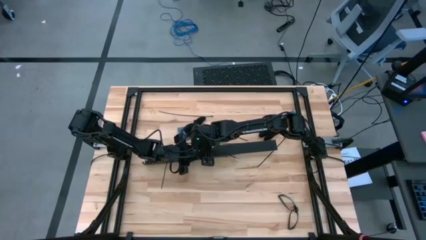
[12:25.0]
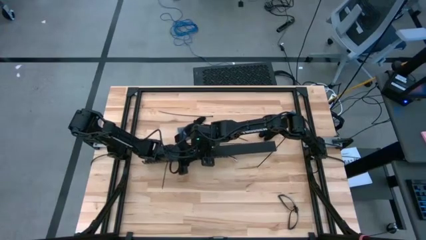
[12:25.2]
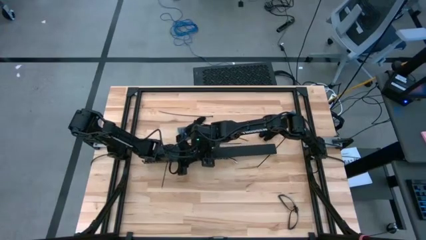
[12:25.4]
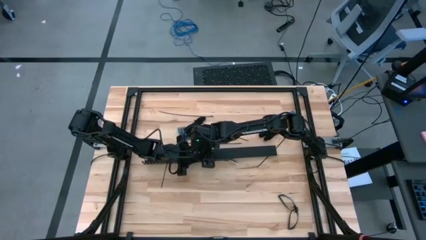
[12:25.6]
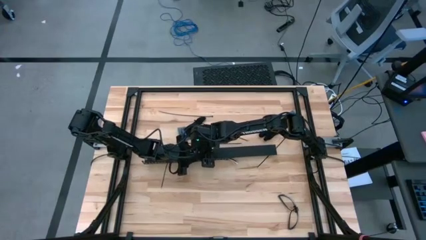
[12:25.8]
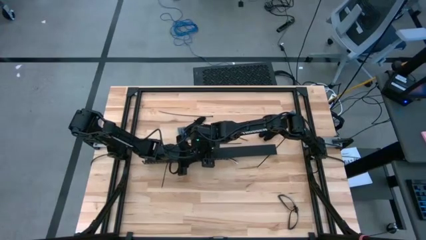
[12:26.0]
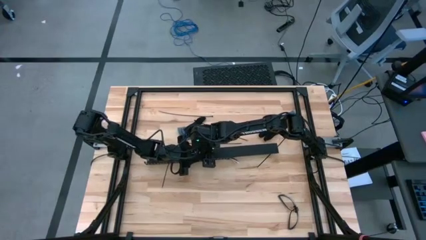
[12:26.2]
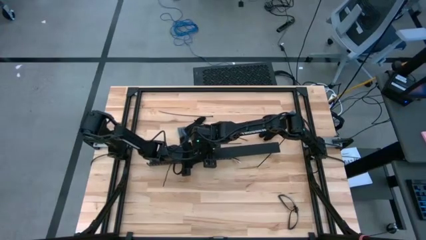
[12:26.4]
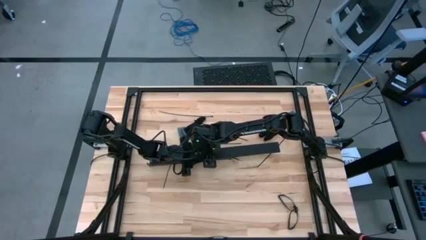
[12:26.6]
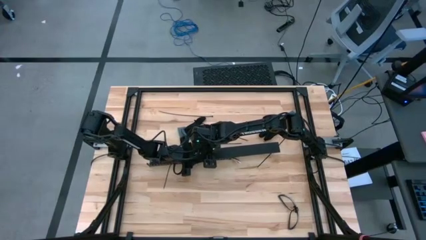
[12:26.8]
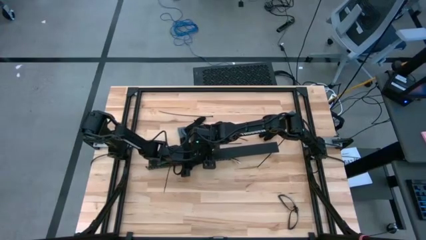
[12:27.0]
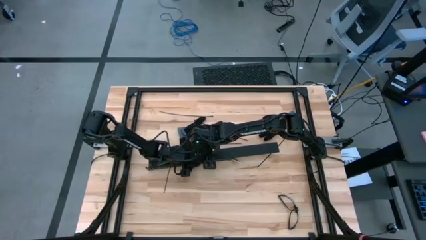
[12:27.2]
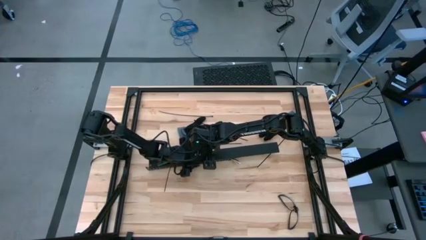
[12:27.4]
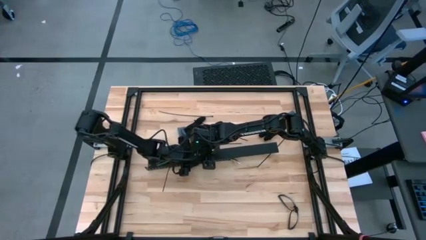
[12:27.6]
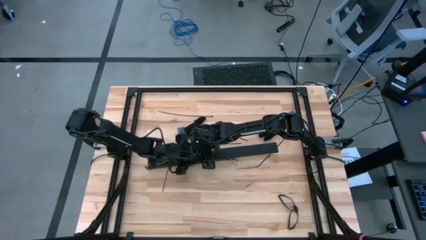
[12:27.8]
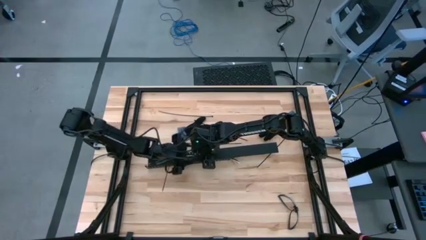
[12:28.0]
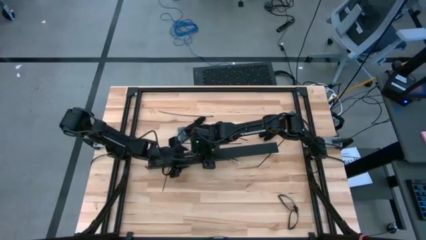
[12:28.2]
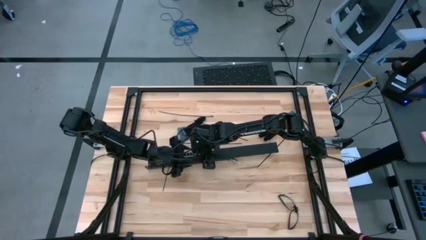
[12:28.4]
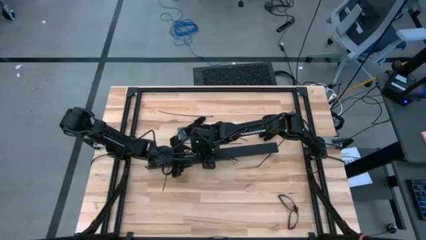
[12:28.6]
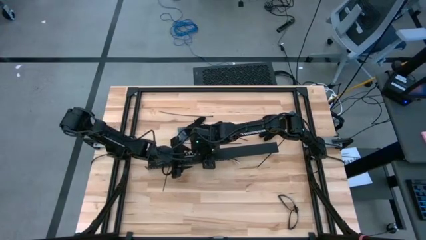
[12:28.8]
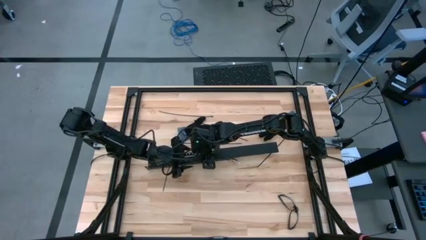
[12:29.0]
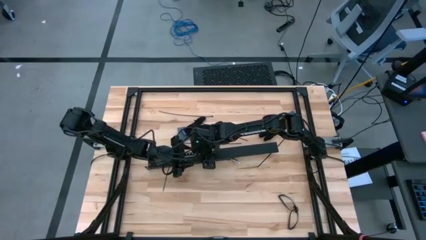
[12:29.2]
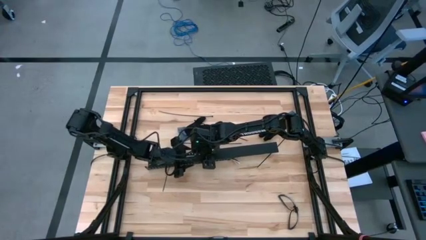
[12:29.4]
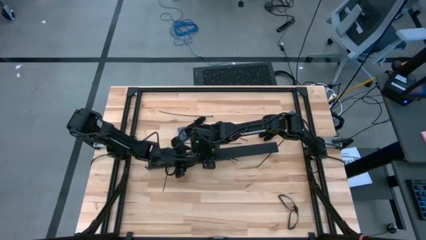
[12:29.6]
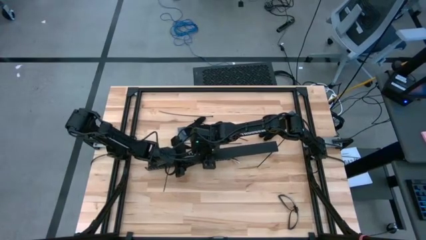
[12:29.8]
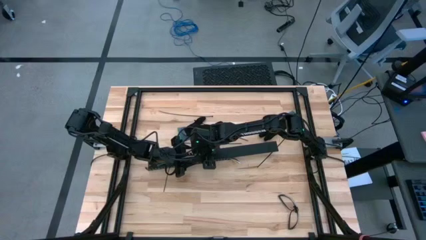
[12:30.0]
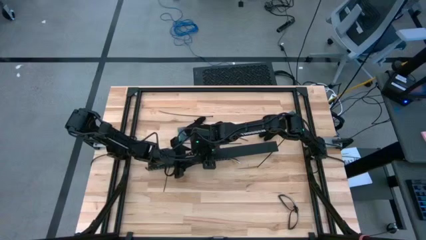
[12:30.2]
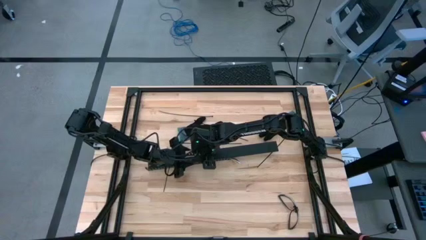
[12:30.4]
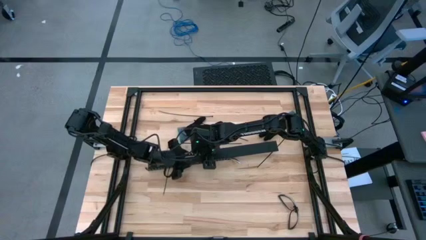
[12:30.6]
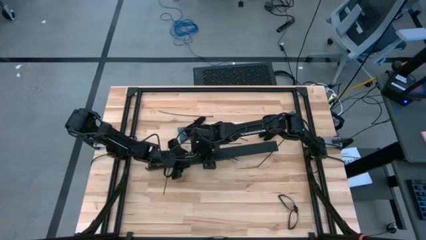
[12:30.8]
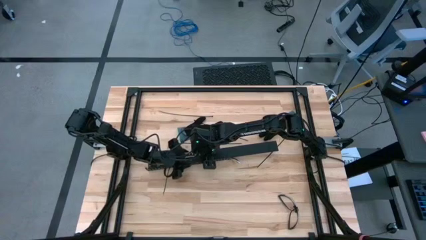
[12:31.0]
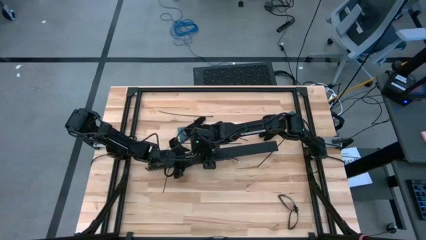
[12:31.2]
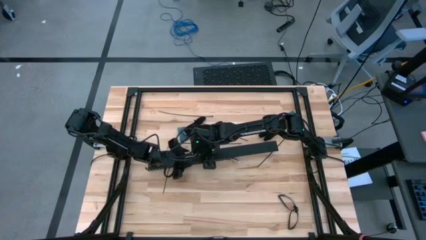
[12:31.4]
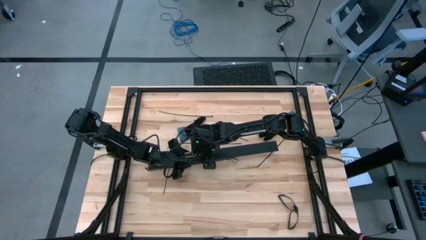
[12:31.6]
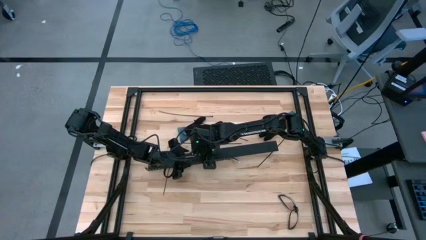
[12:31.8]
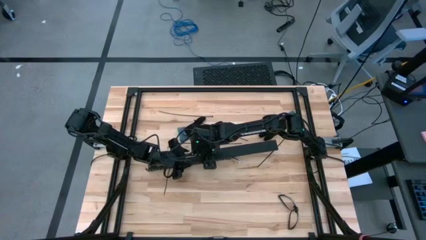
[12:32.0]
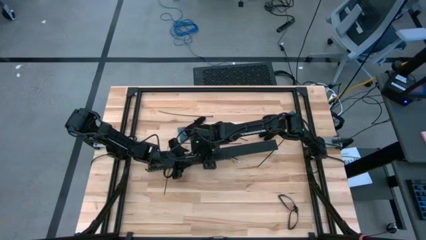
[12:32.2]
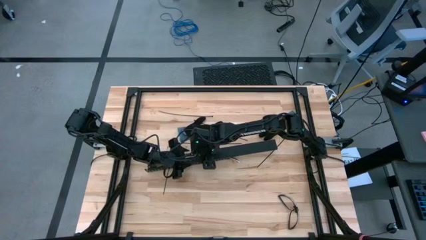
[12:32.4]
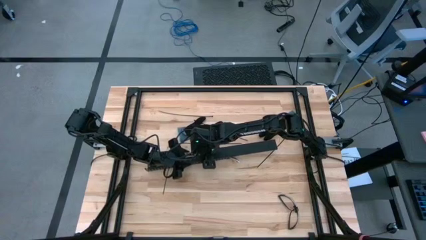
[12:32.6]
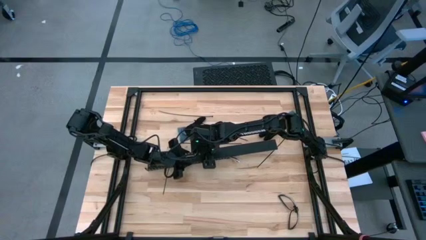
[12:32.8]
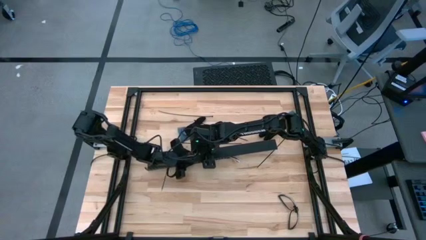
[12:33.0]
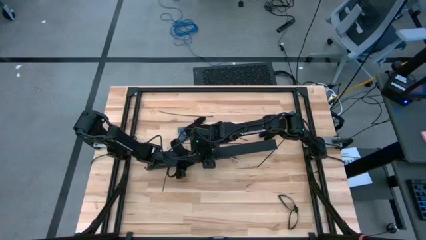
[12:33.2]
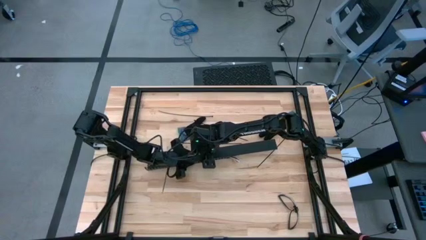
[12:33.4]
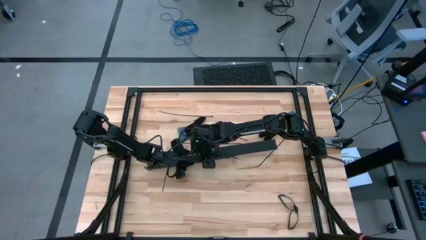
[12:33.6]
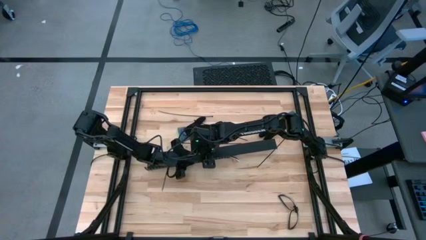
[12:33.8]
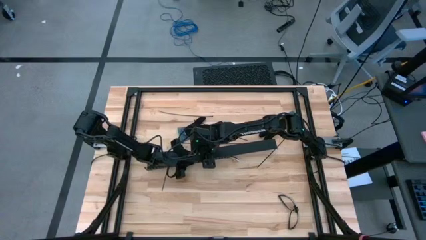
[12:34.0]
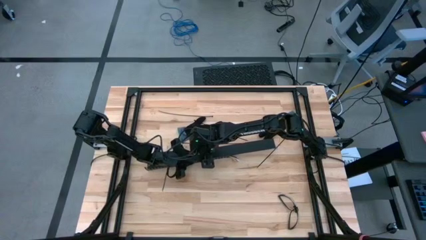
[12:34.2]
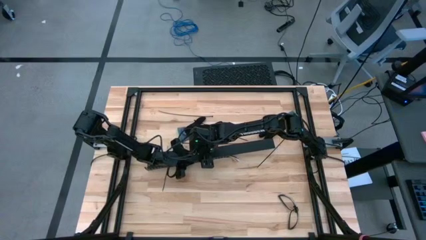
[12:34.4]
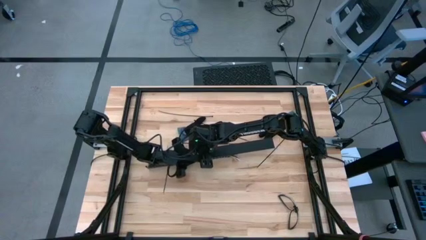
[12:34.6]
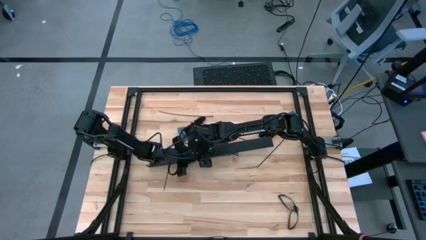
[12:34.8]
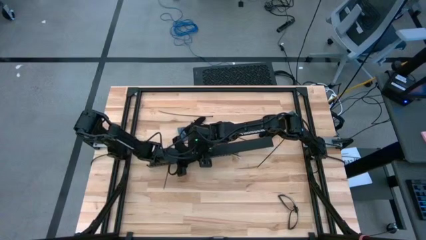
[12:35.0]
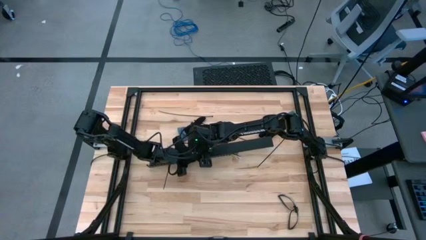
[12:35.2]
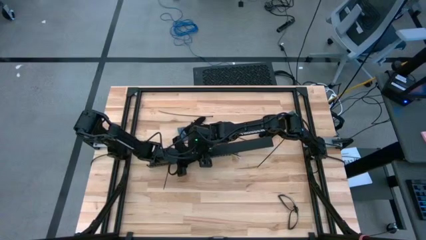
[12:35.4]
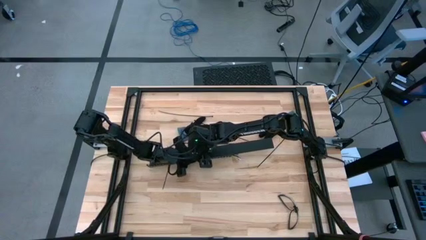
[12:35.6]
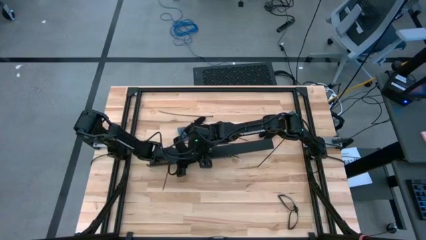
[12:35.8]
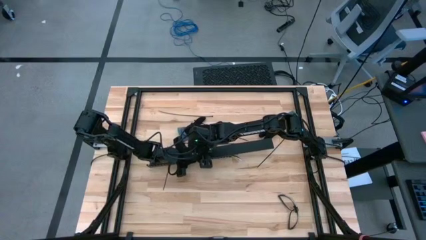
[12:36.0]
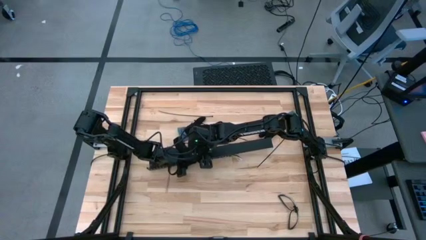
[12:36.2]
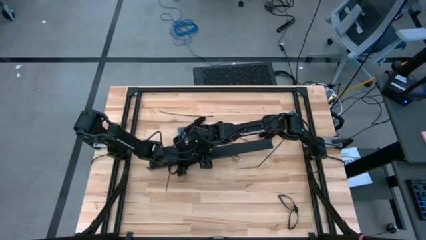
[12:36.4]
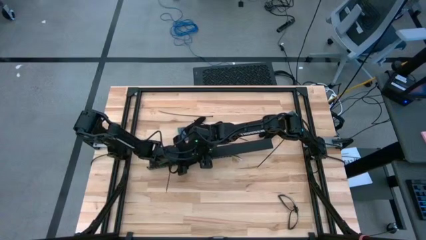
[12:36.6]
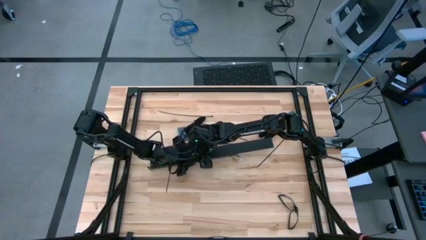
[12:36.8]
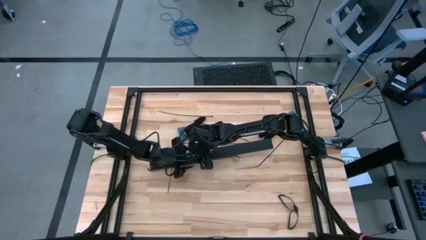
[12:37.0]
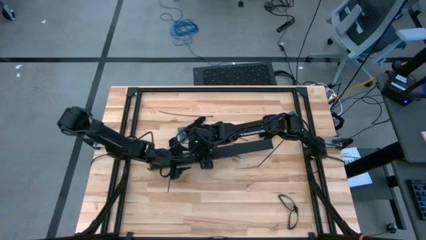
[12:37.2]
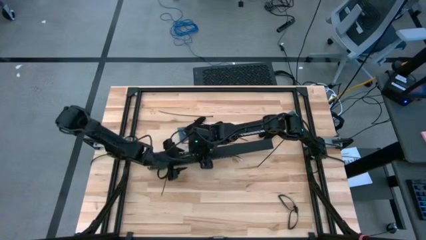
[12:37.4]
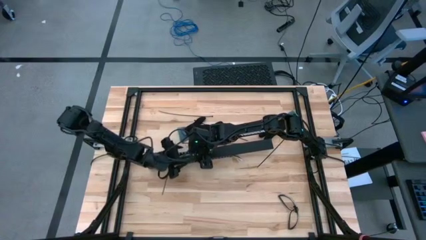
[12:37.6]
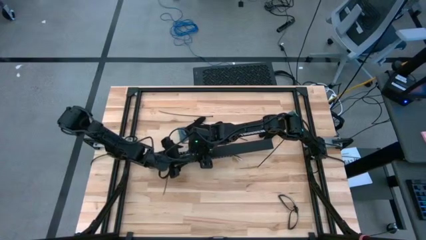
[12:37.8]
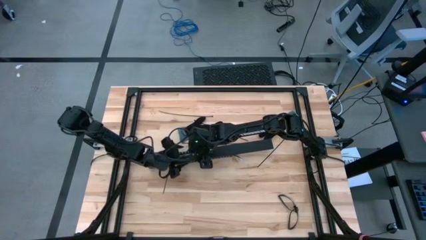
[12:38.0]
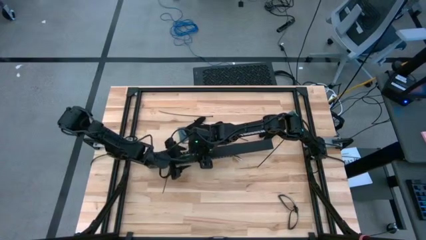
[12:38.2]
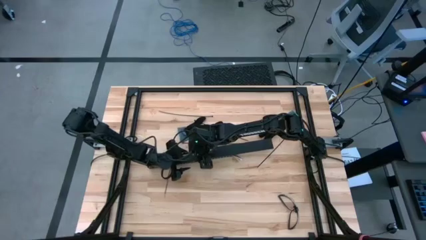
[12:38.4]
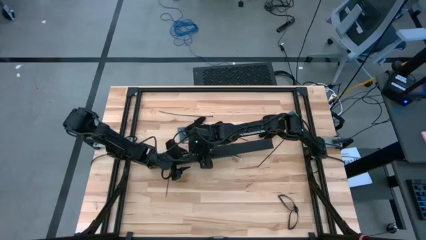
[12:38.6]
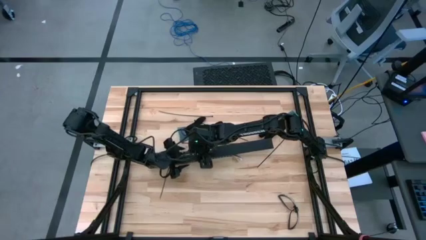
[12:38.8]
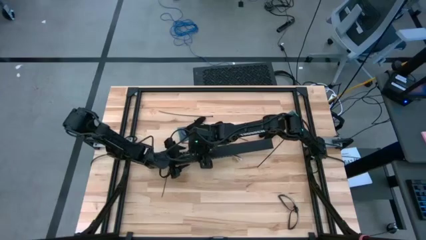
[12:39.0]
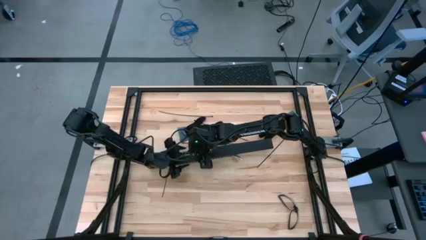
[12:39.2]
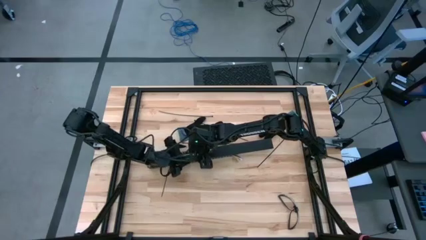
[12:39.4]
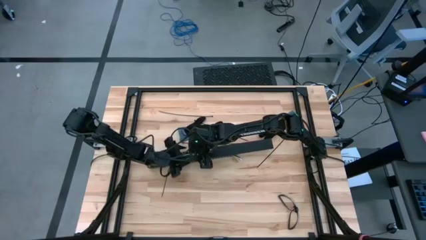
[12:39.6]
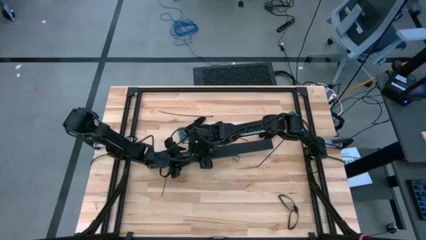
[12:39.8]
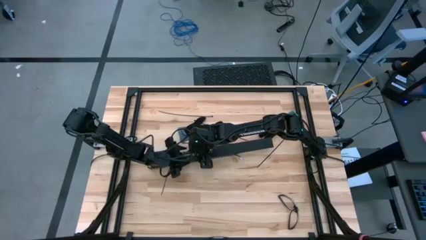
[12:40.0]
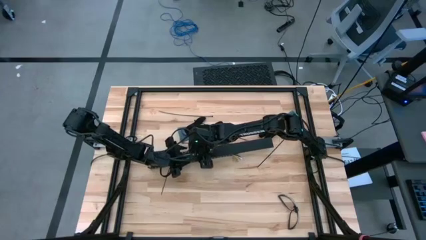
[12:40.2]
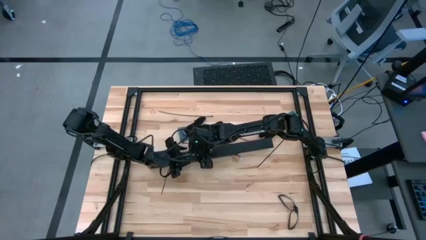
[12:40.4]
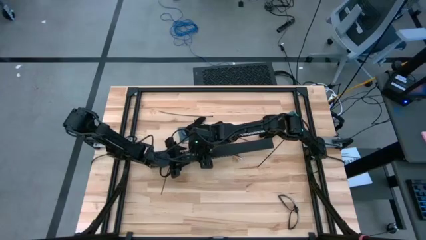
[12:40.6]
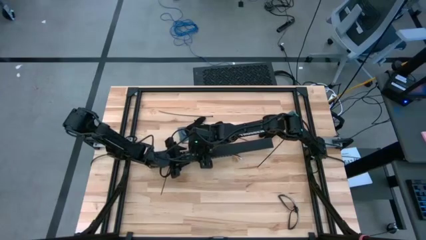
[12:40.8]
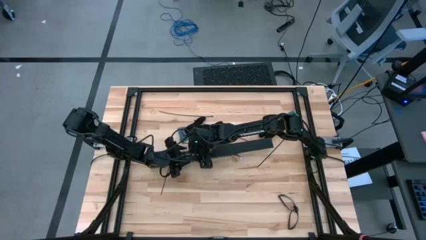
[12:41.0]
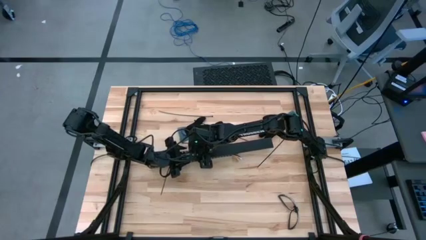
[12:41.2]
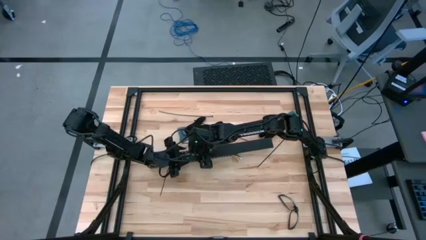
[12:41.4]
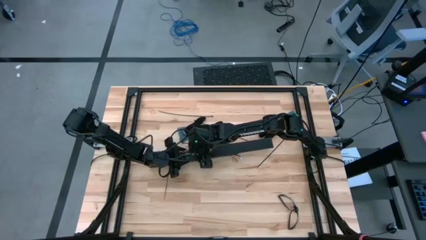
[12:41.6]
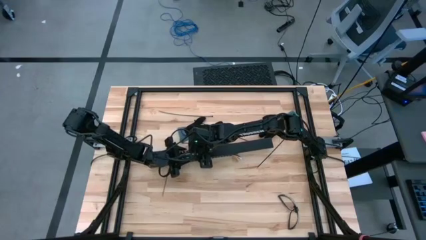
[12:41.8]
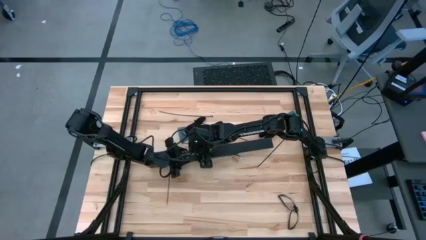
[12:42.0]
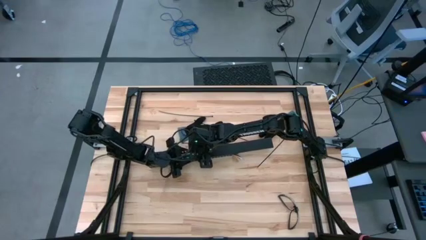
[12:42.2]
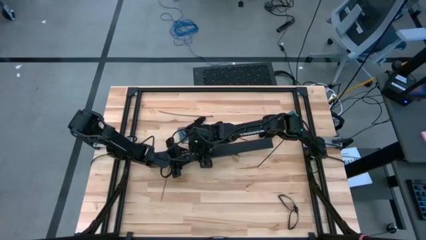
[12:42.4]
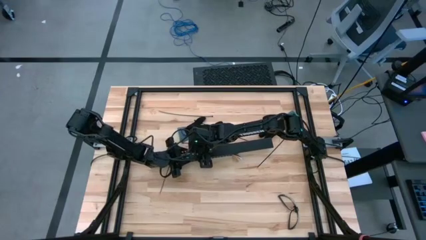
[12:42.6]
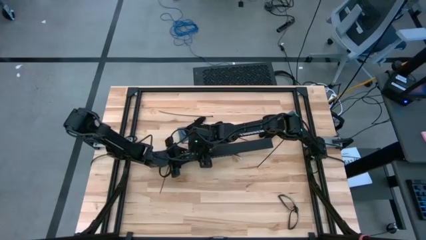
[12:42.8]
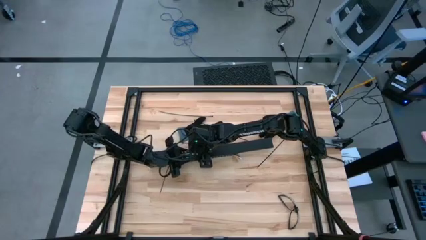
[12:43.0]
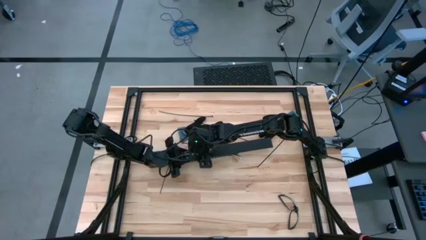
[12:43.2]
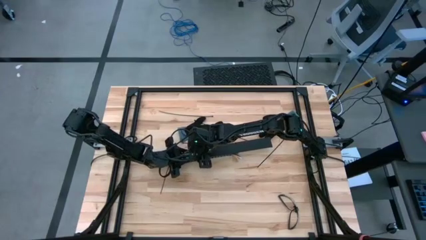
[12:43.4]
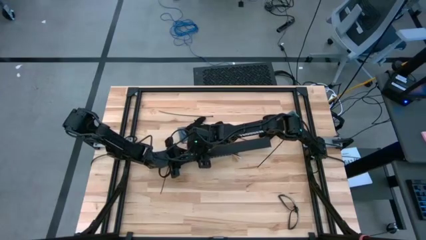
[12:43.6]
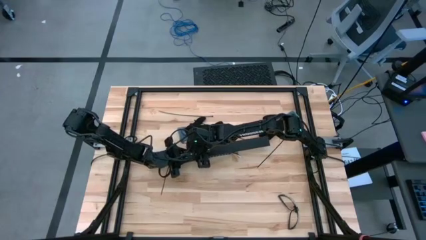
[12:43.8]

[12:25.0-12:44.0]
Task: Ziptie cables
Close the cable duct
